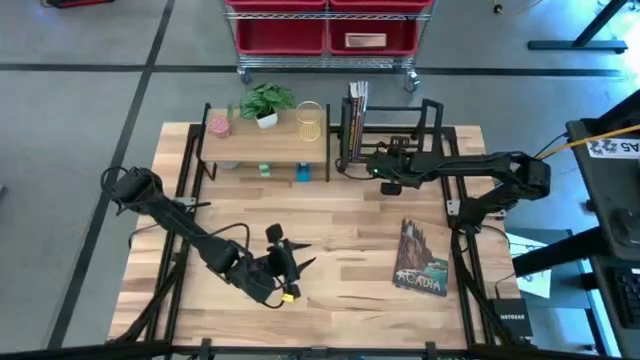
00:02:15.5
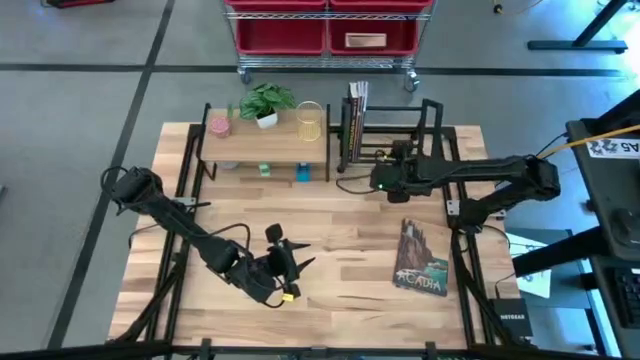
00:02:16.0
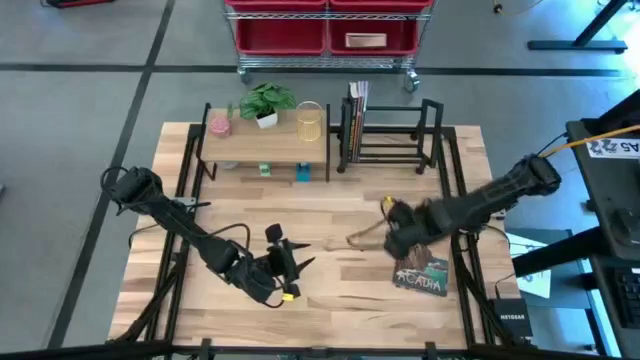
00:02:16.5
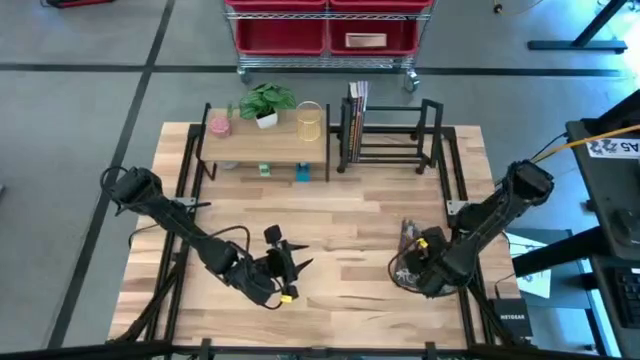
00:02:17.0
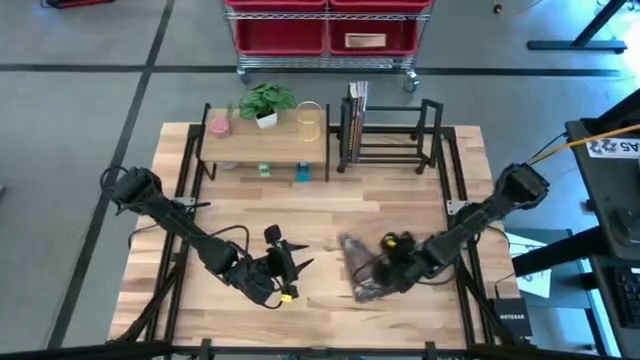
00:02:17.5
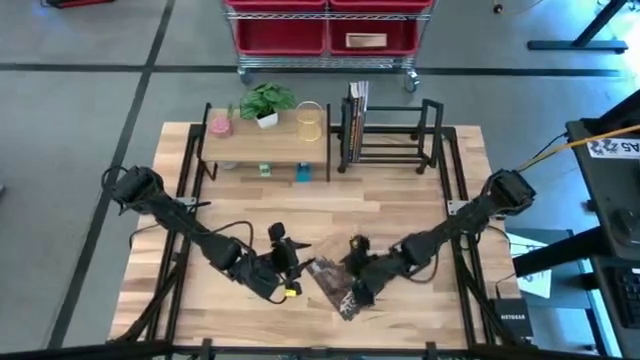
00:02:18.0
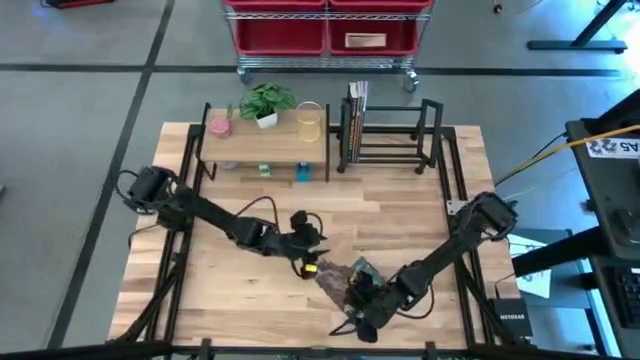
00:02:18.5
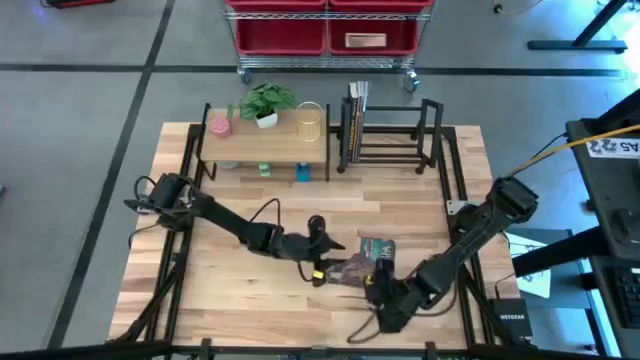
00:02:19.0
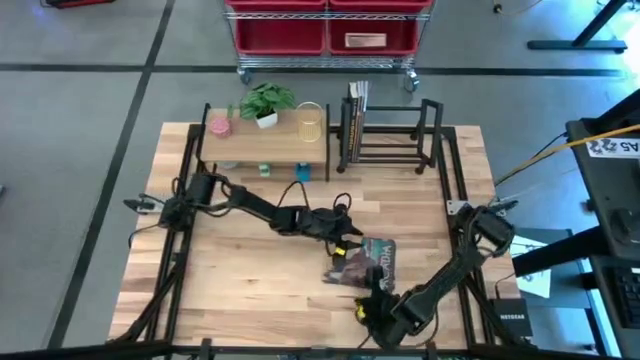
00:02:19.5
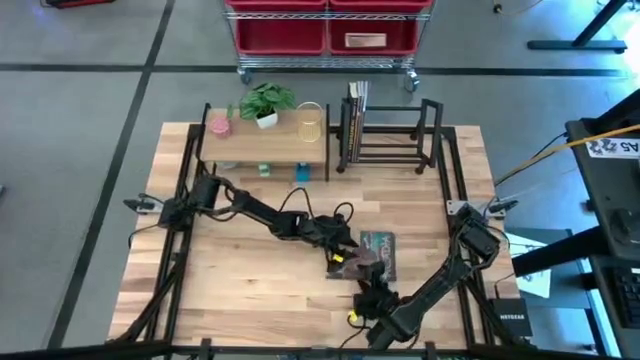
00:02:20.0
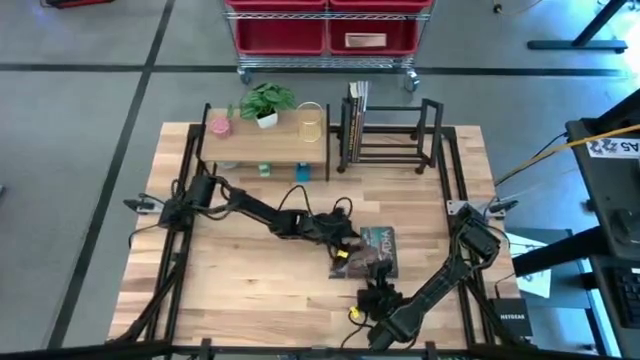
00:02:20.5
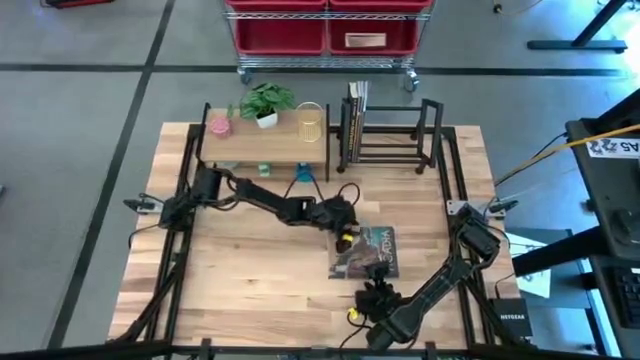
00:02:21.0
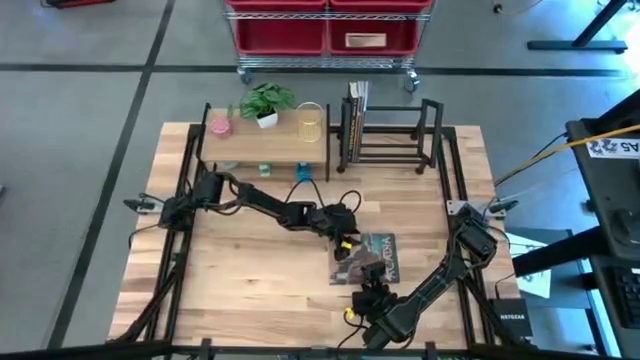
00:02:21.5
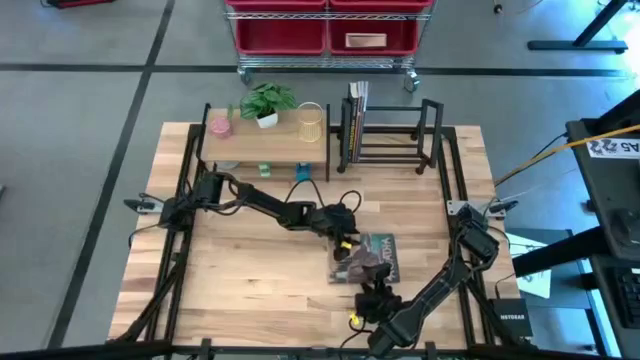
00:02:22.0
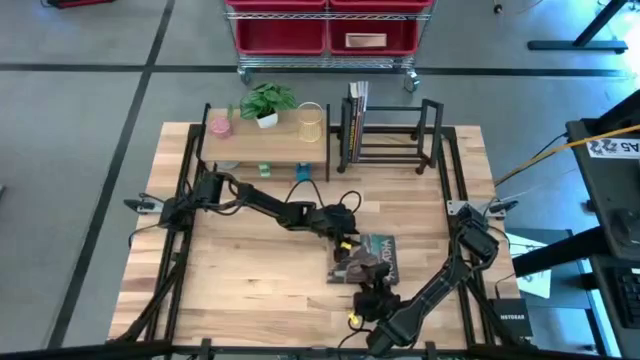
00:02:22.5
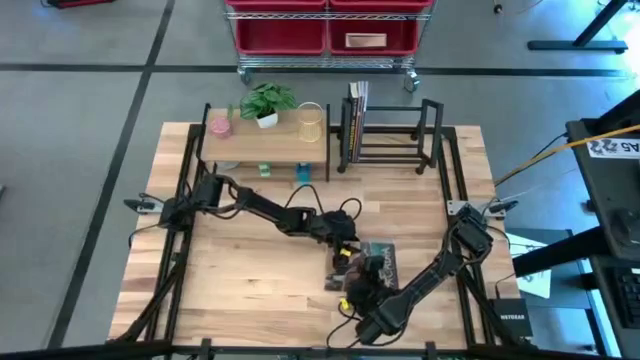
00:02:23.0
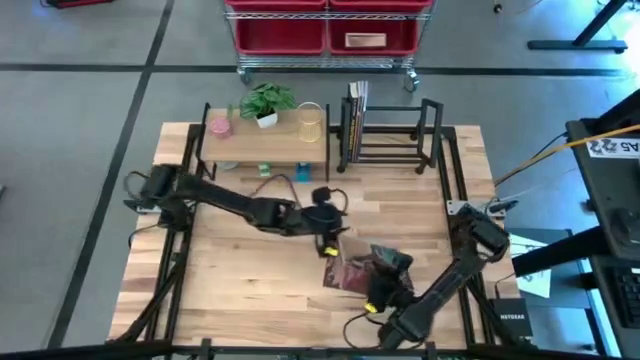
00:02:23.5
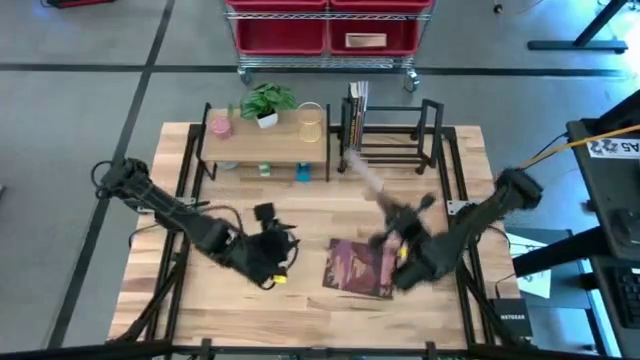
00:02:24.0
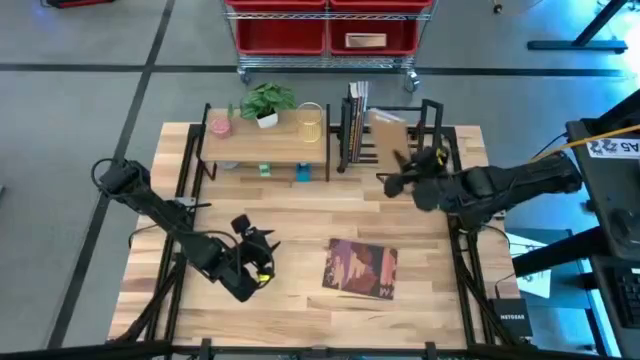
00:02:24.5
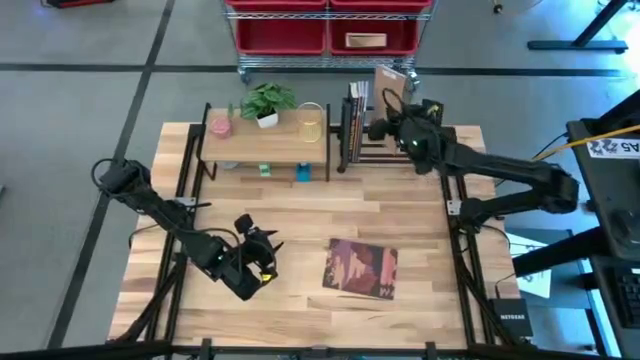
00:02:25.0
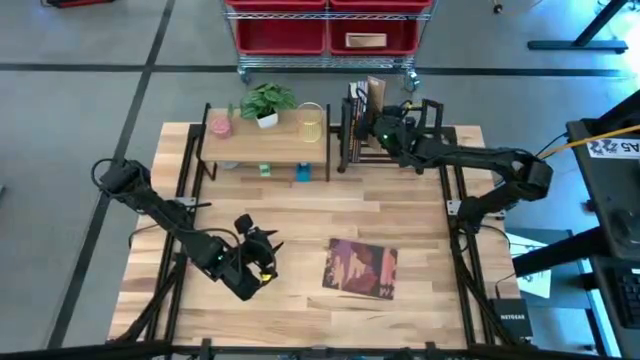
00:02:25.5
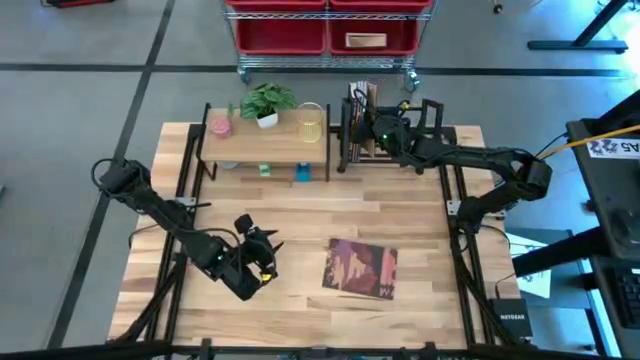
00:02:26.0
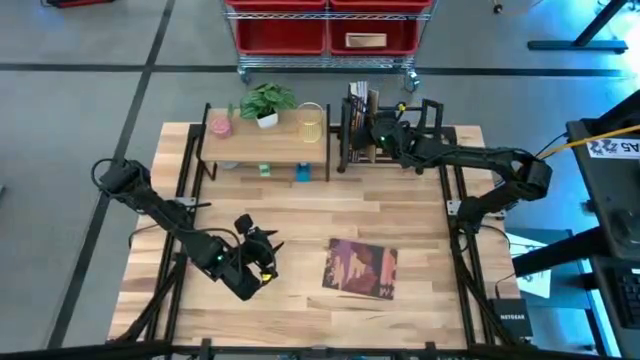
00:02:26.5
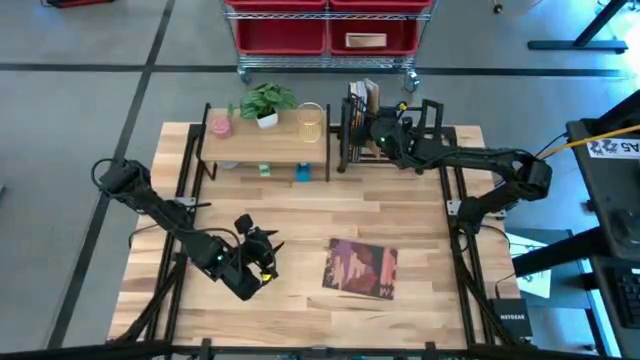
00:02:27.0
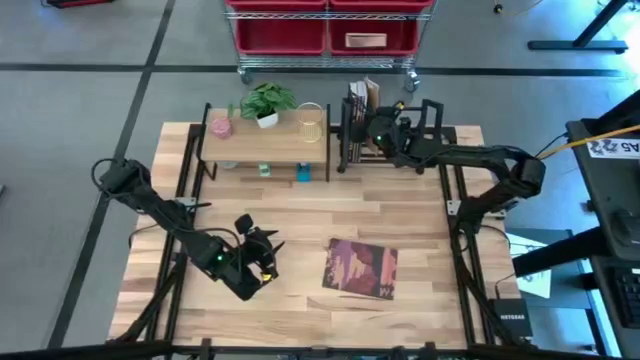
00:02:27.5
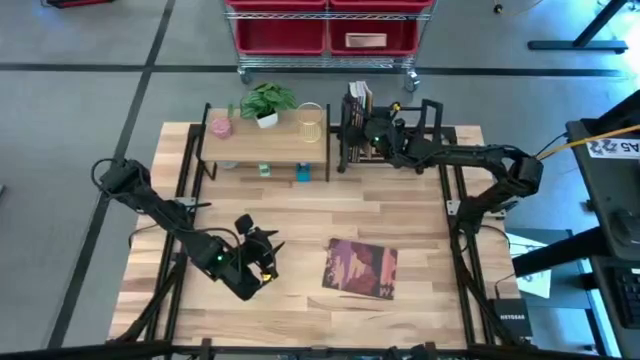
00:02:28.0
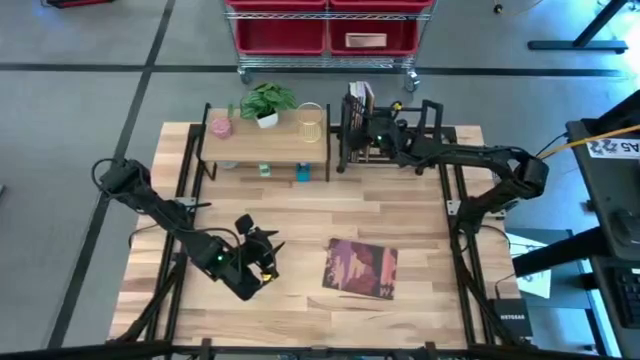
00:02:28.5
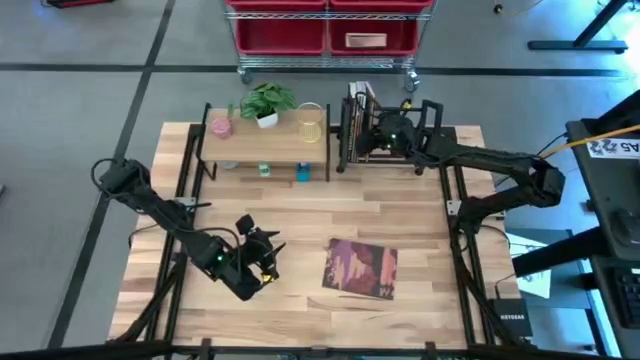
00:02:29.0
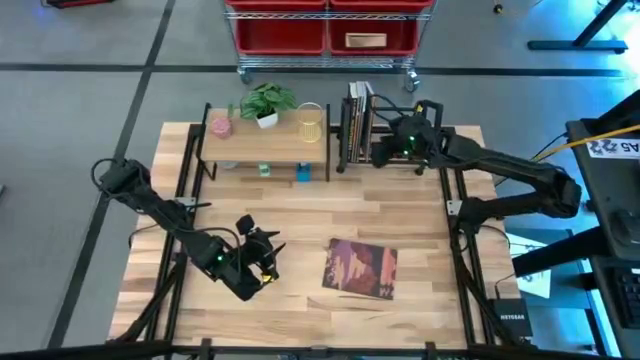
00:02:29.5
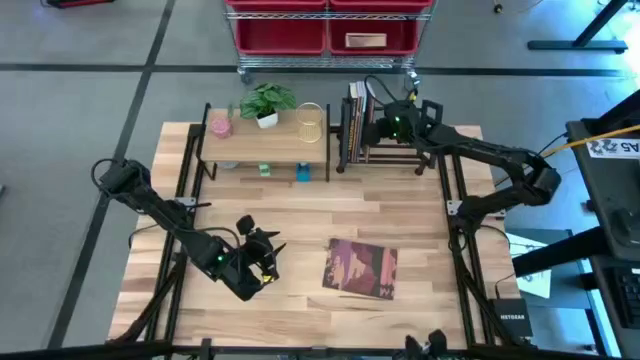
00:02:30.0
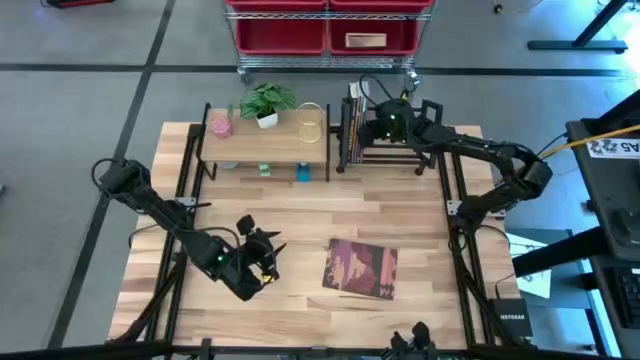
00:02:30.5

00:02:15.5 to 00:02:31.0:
Task: Stock shelves
Put the brown book on the bookshelf

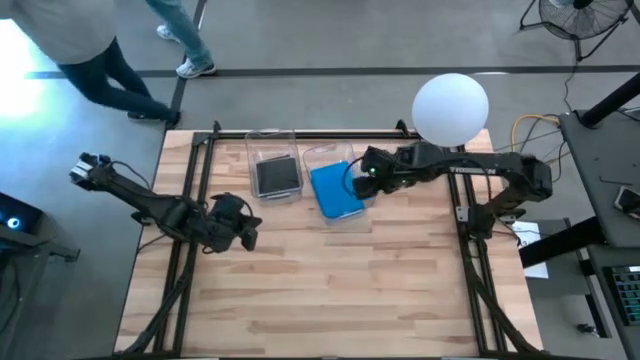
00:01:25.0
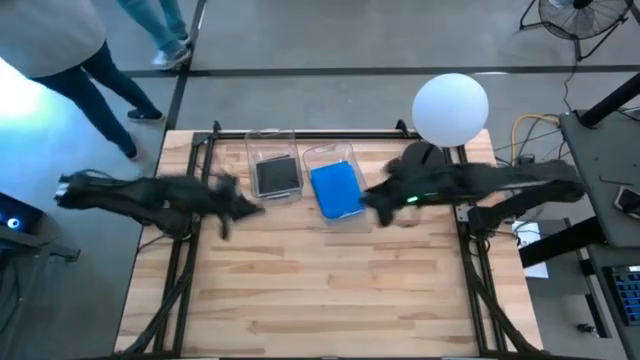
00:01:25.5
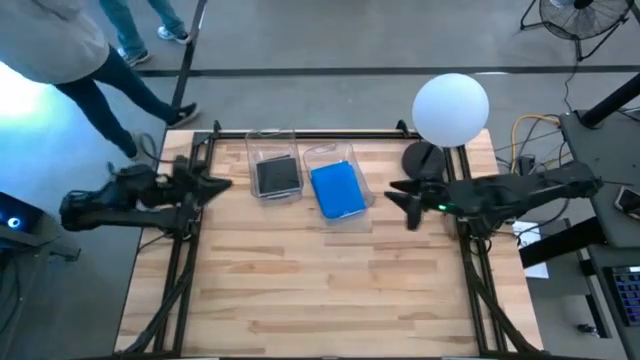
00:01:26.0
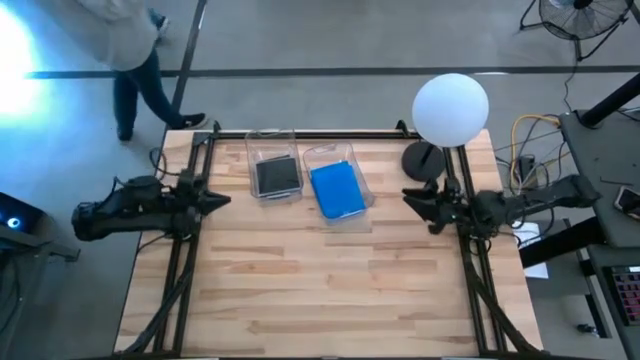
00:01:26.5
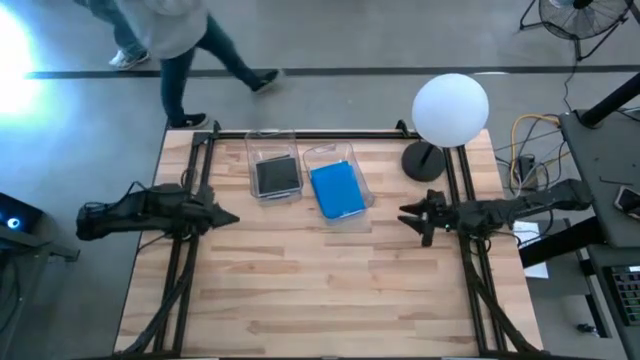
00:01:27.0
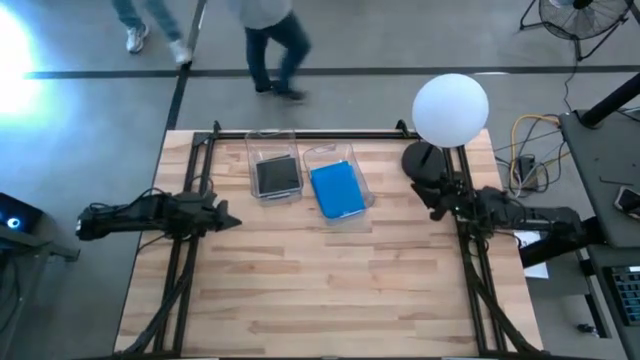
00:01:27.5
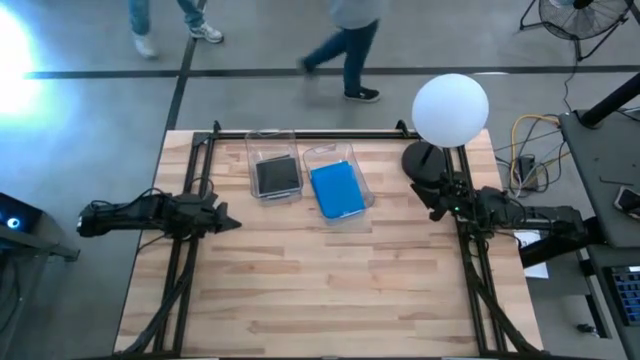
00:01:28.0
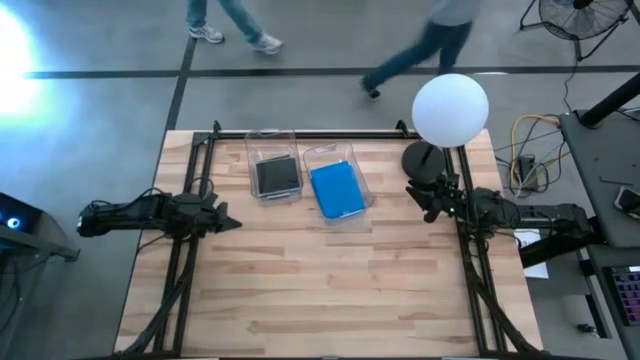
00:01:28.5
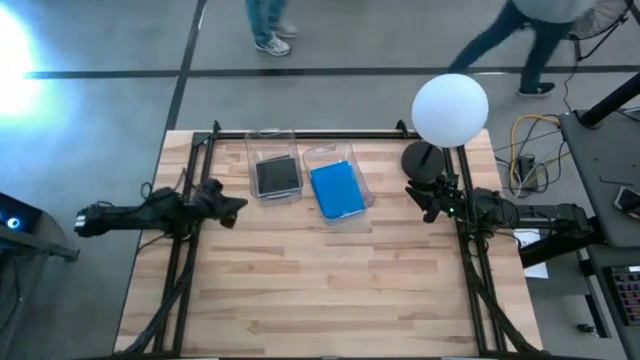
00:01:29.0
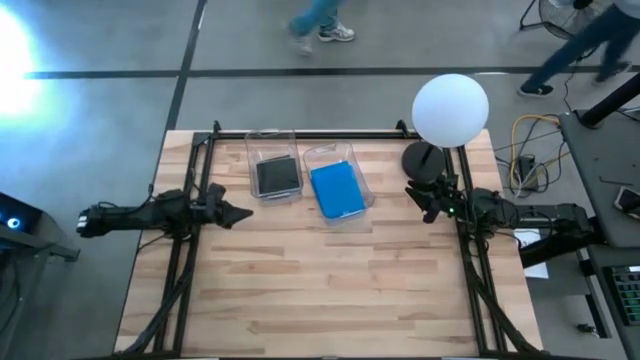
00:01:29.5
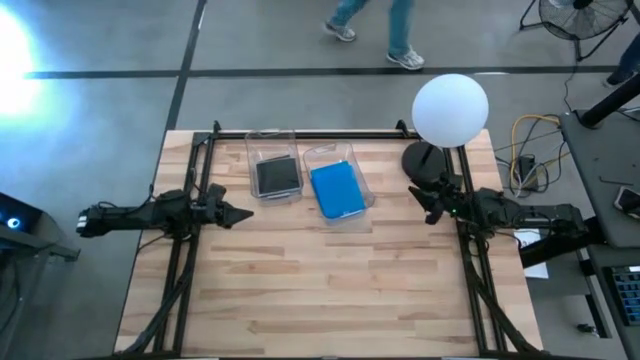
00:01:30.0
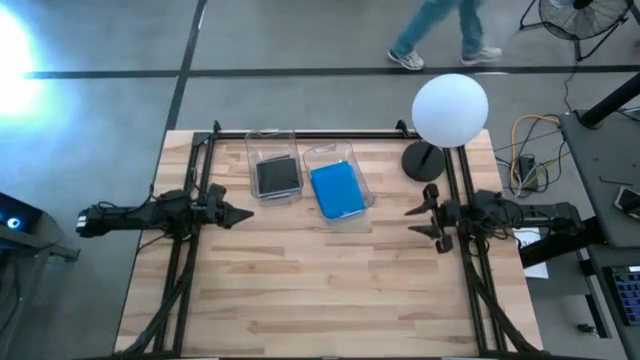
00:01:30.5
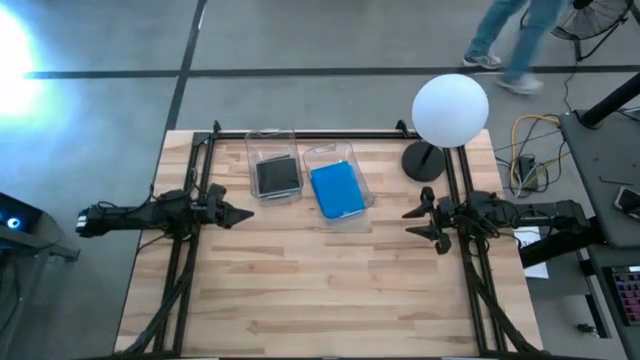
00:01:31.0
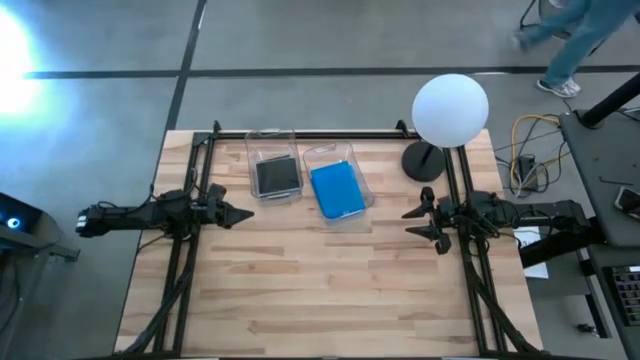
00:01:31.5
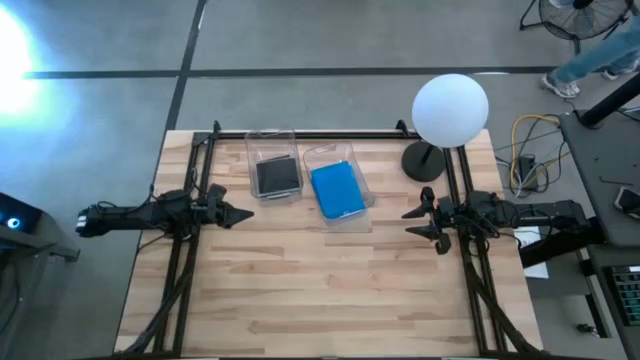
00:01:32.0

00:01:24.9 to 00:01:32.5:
Task: Pick & place jewel cases by type
Return to Home Position
